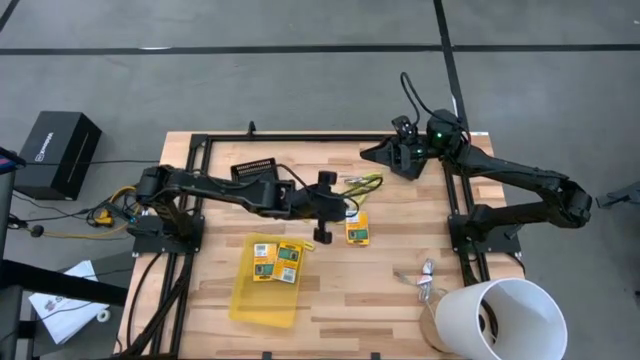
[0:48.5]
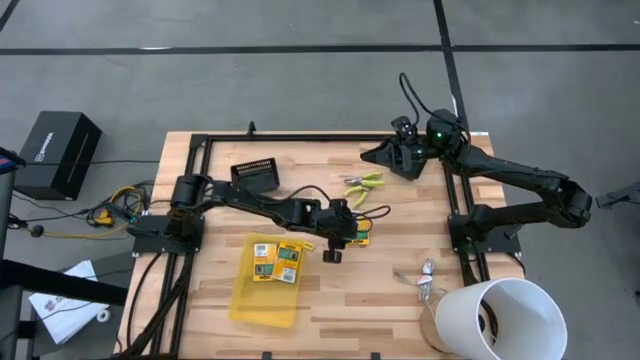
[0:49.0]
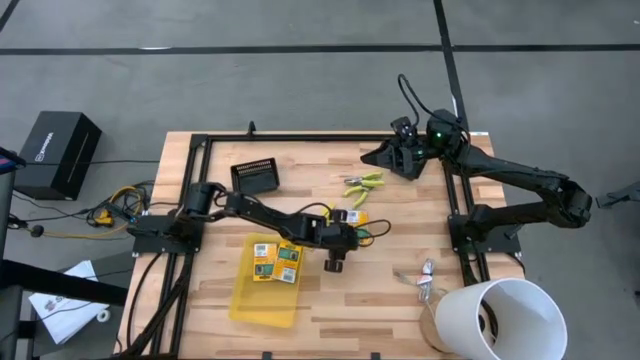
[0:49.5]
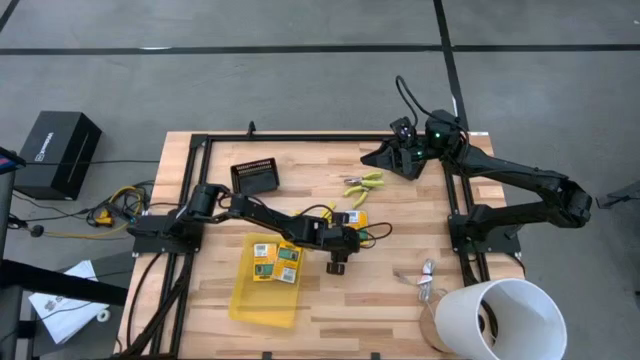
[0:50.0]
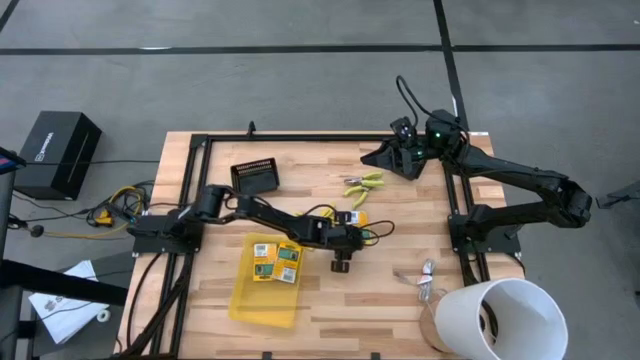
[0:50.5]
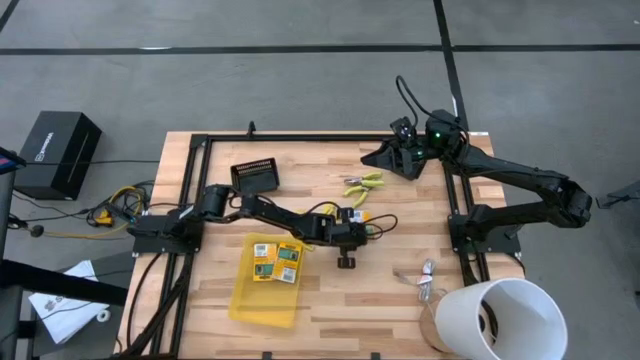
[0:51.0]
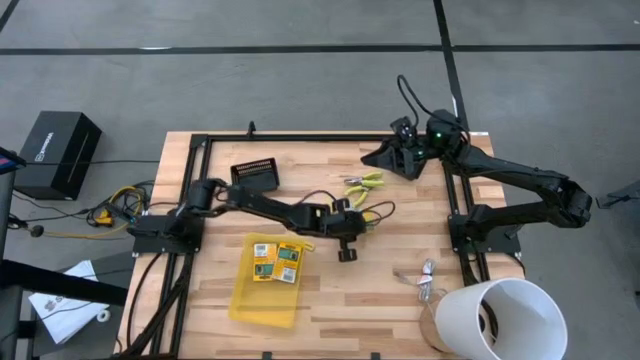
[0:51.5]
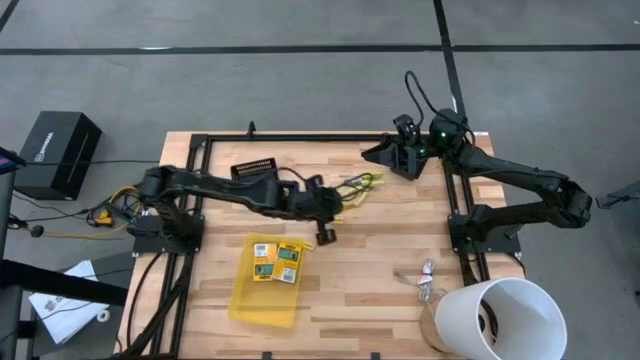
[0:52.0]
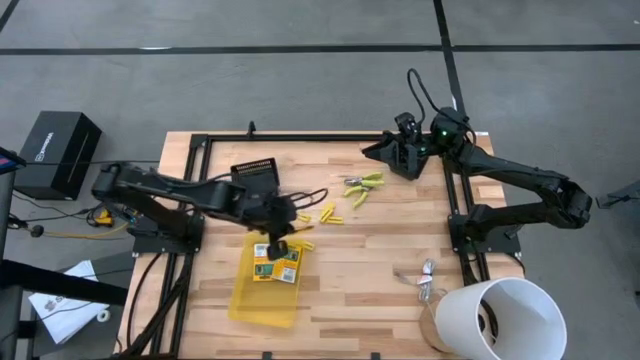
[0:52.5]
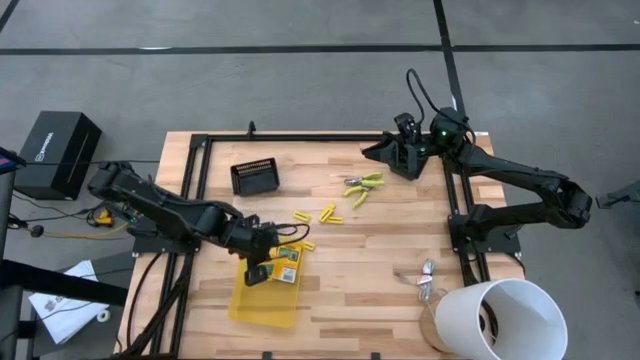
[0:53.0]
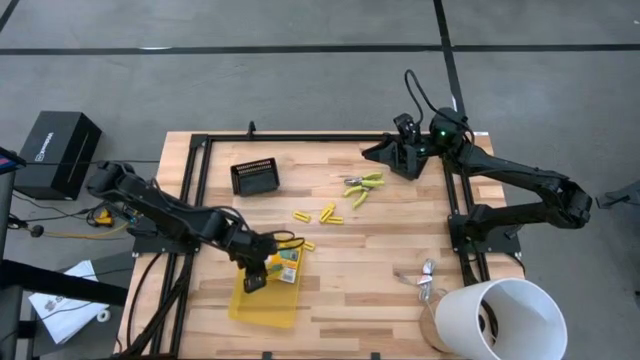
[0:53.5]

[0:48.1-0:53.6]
Task: Pick & Place School Supplies
Put the yellow crayon box into the yellow bin

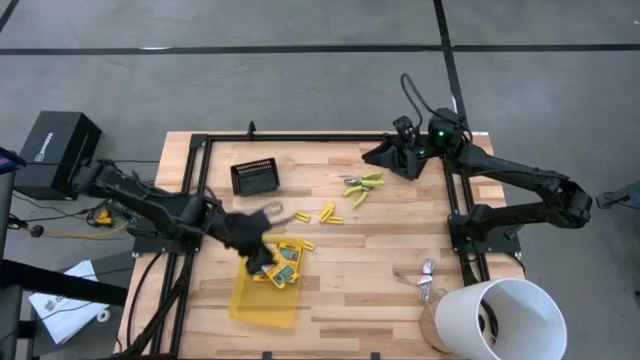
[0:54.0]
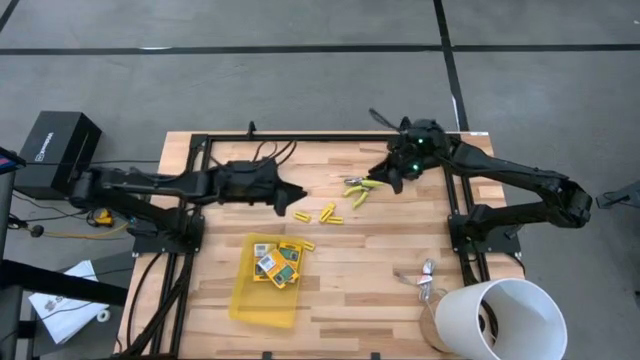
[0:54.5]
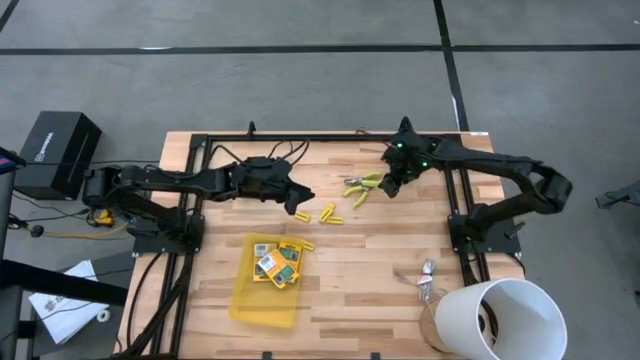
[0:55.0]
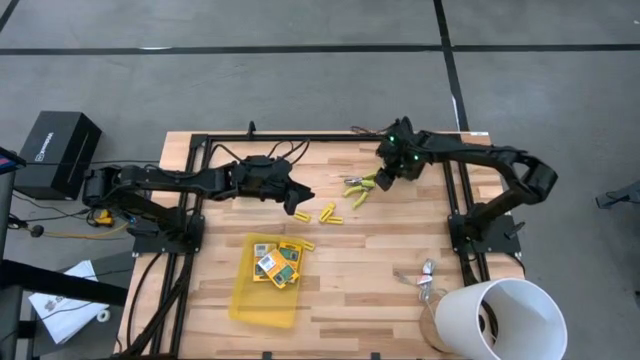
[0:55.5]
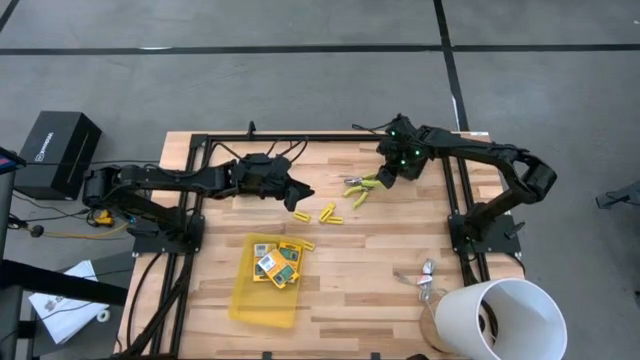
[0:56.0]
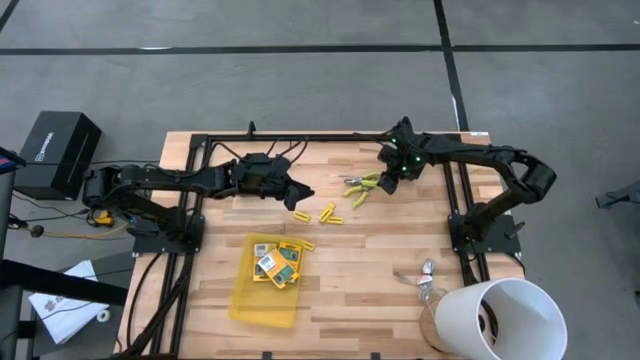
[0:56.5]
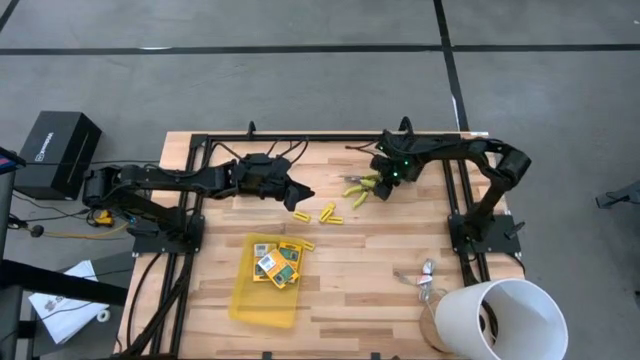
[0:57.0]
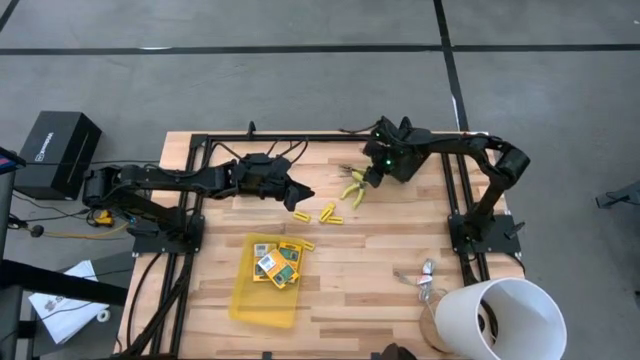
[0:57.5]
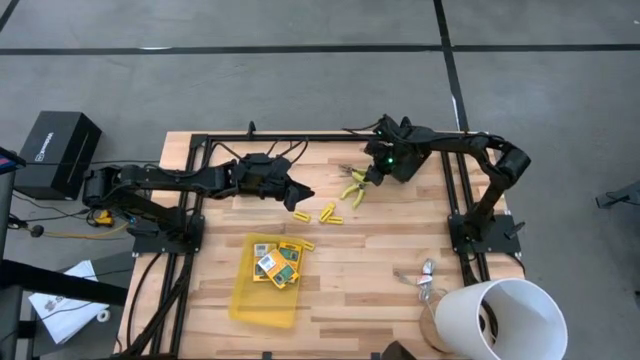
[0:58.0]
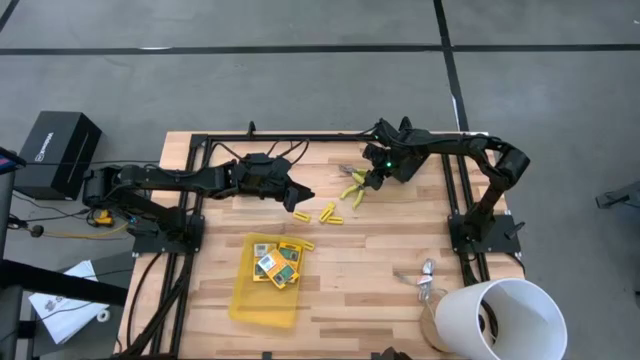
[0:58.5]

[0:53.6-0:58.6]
Put the green puncher into the right black bin

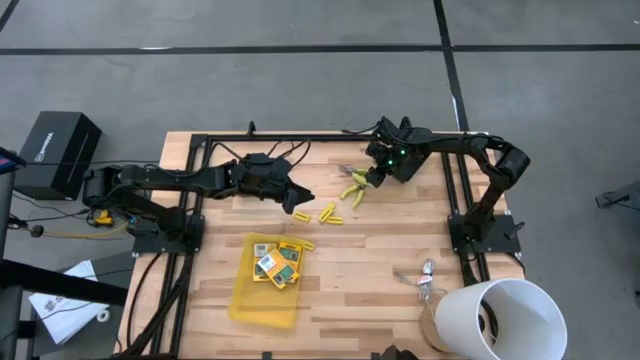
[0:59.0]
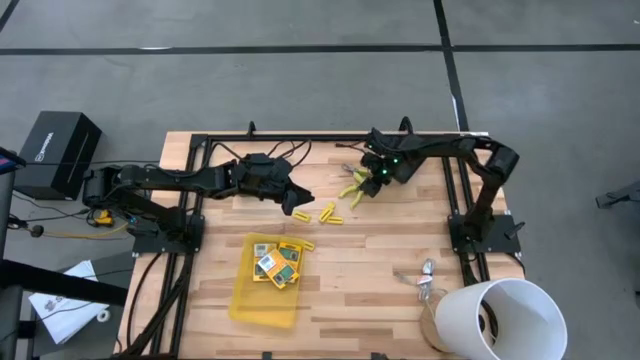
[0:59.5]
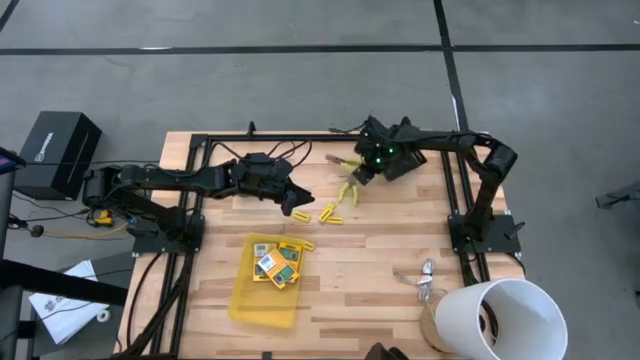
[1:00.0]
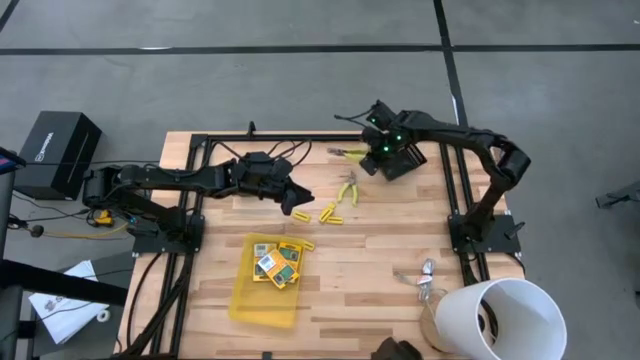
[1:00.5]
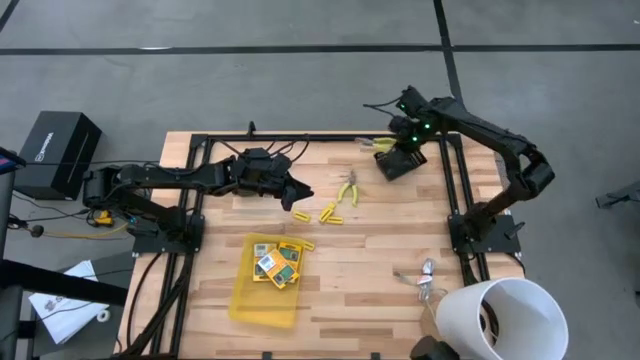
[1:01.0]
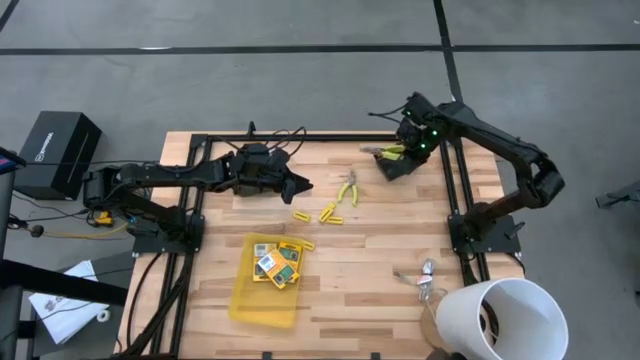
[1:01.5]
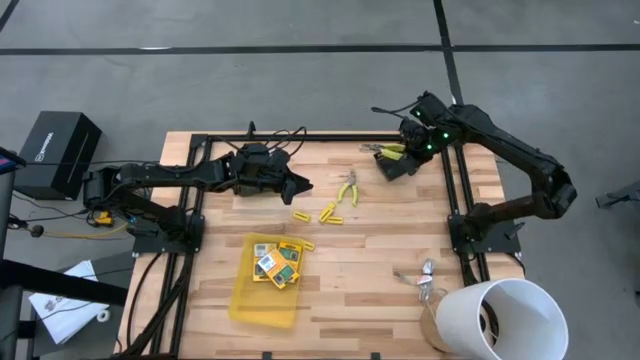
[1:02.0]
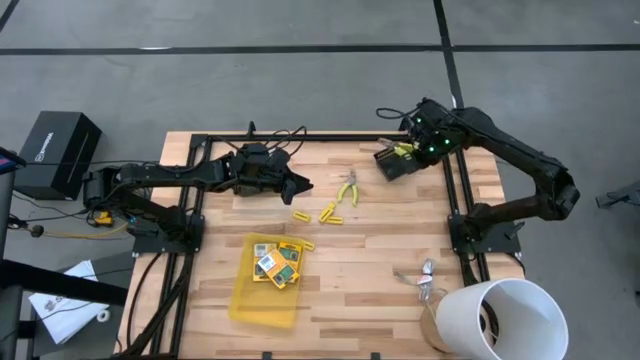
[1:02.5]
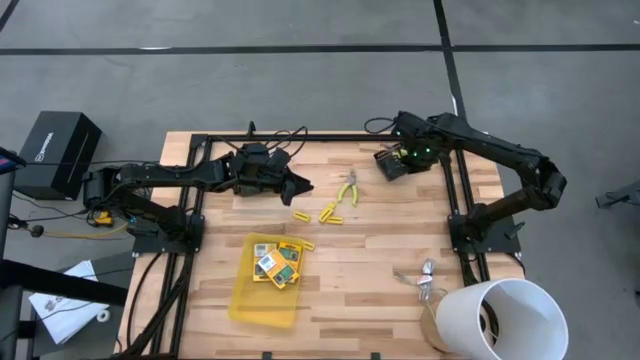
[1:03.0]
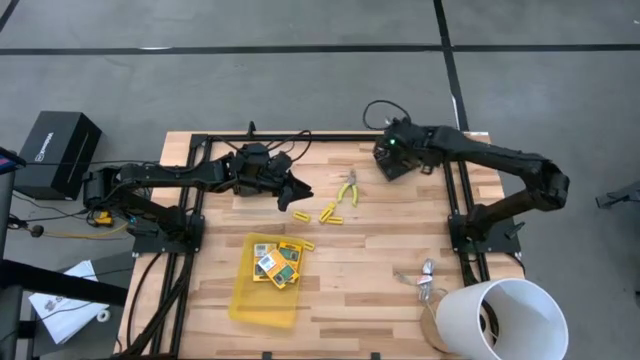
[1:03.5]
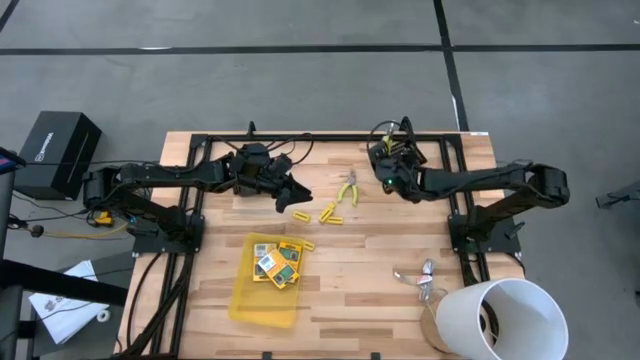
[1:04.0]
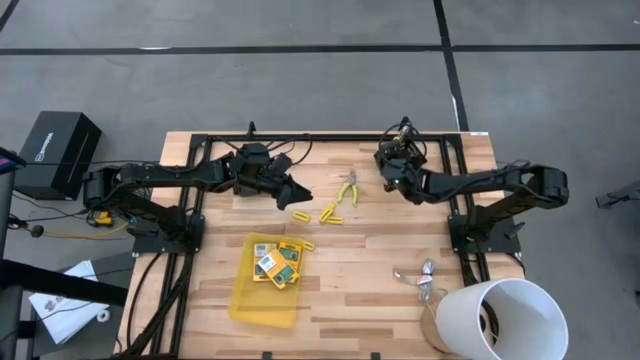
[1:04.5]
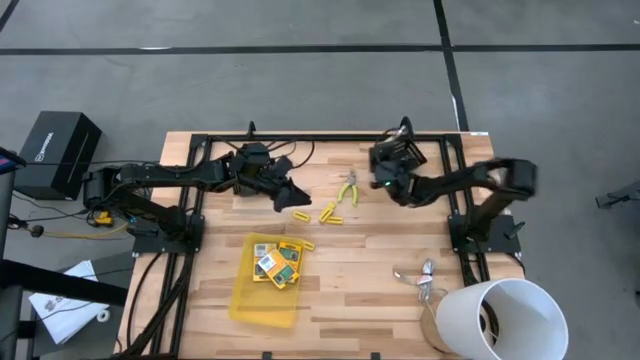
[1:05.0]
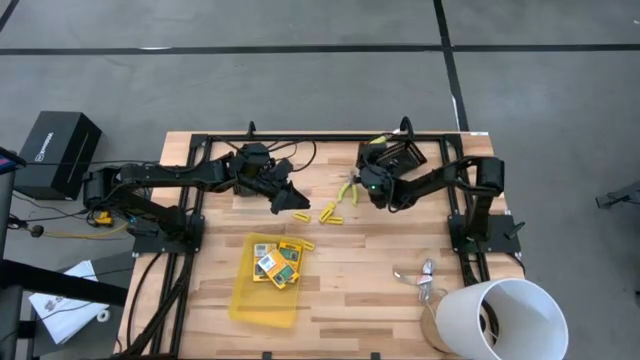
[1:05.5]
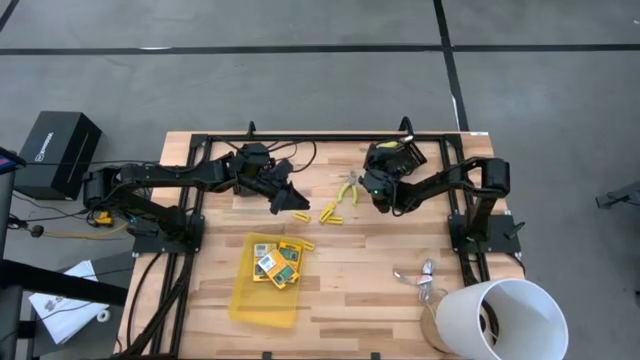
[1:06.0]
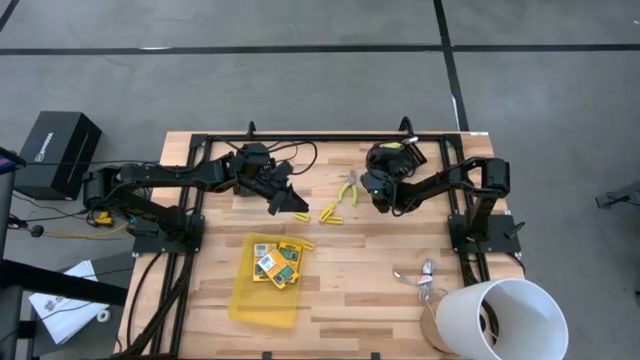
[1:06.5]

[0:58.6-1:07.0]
Put the green puncher into the right black bin

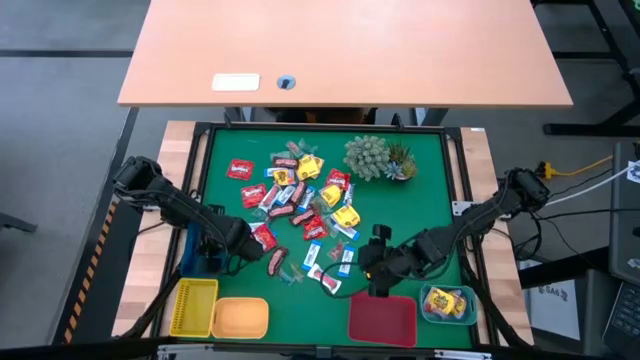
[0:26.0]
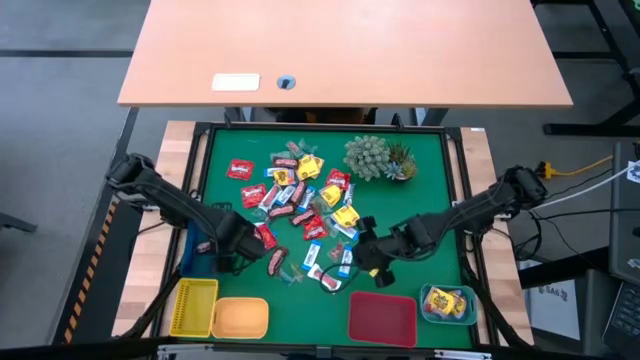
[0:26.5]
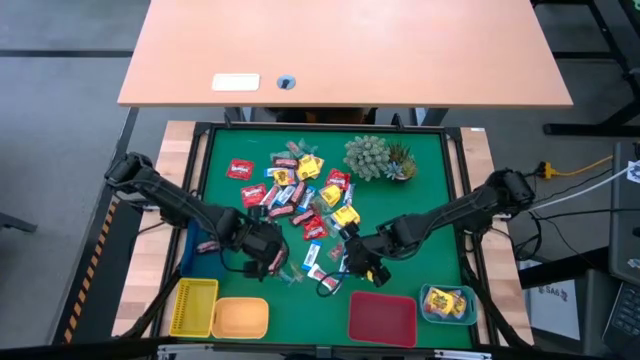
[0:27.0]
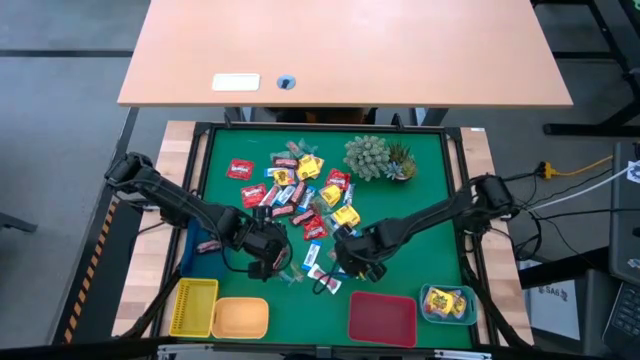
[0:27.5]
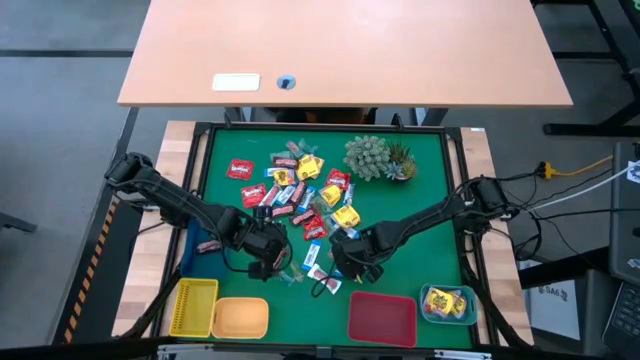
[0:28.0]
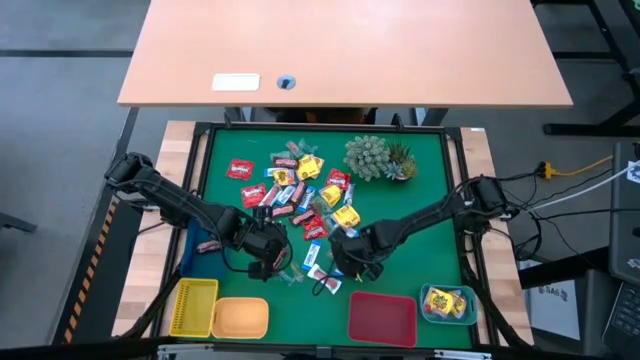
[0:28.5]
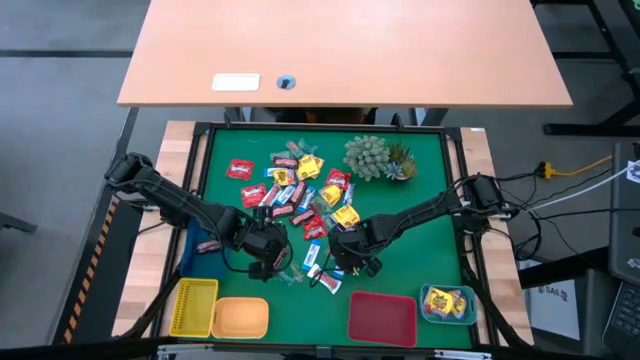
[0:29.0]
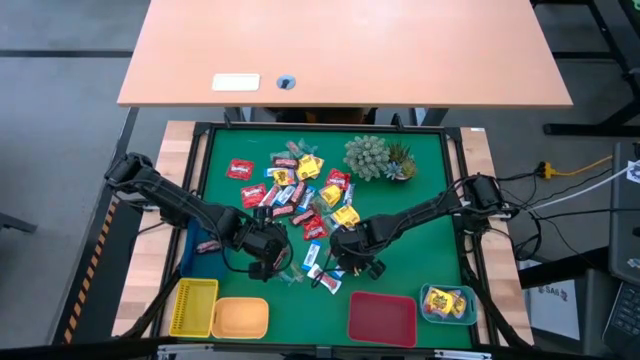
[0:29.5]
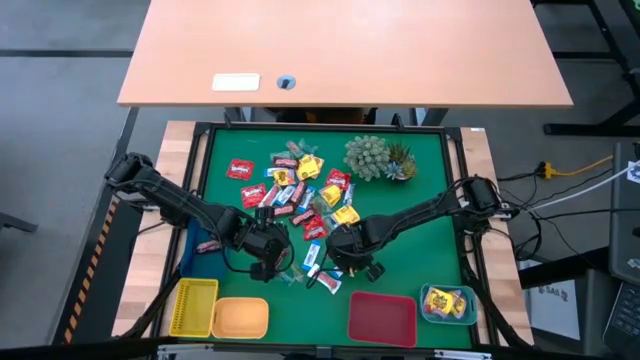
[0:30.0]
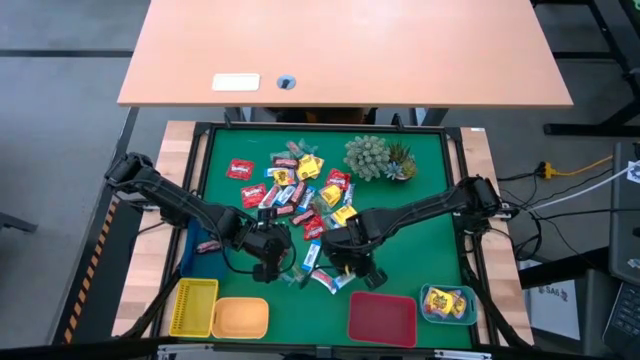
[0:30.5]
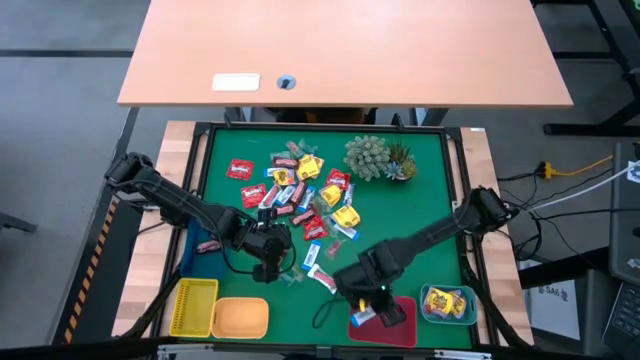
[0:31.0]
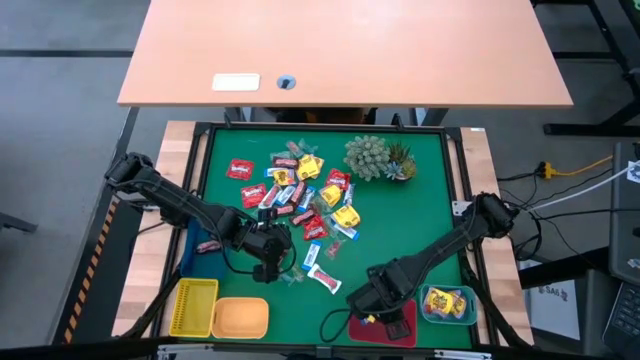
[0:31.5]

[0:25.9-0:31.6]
Task: Sort candy
Put the blue chocolate into the red bin
